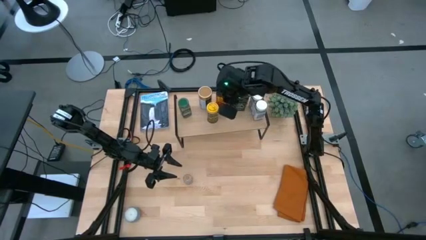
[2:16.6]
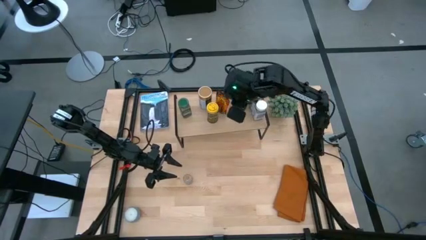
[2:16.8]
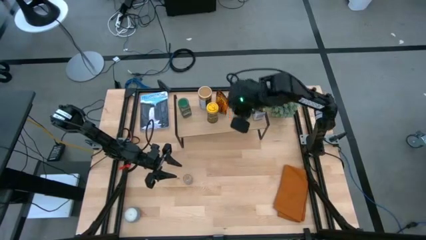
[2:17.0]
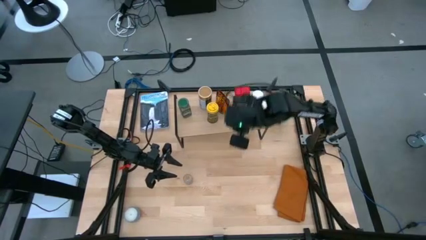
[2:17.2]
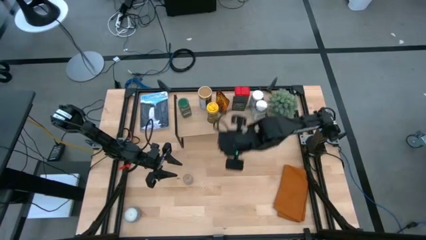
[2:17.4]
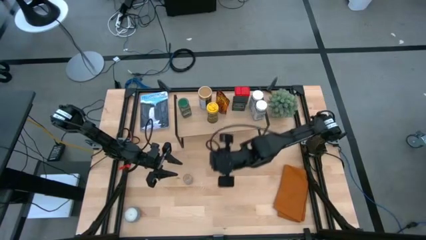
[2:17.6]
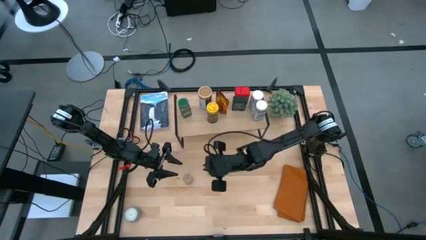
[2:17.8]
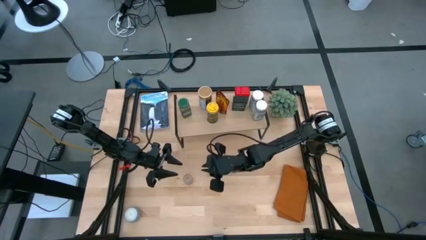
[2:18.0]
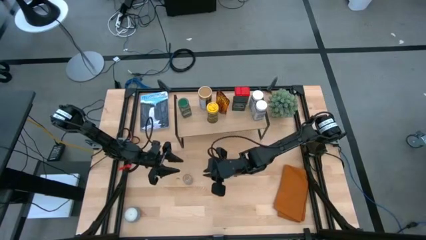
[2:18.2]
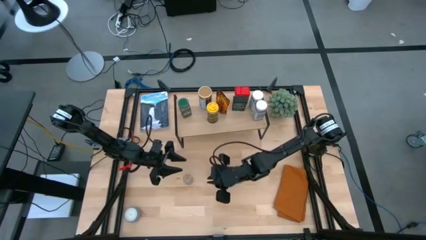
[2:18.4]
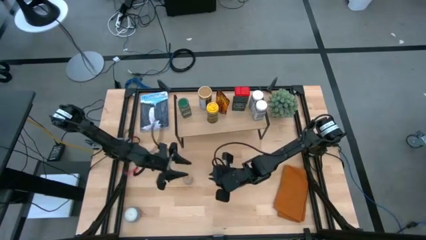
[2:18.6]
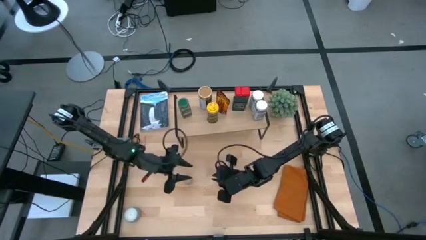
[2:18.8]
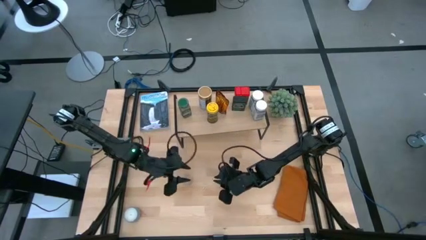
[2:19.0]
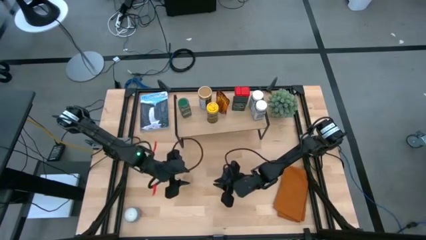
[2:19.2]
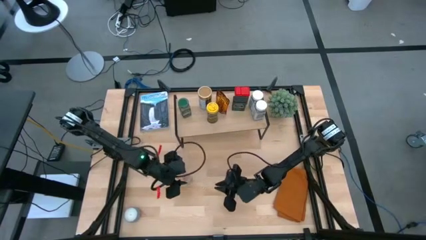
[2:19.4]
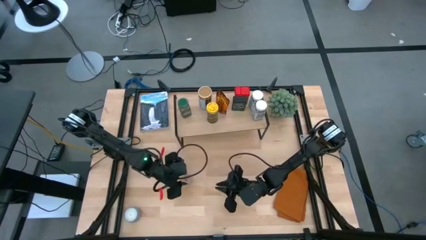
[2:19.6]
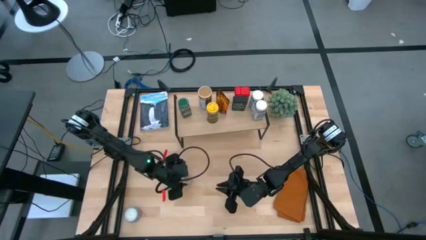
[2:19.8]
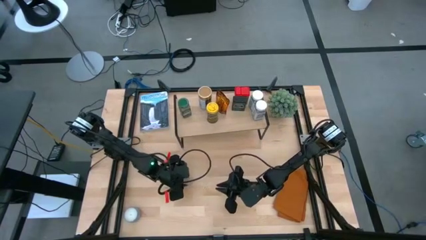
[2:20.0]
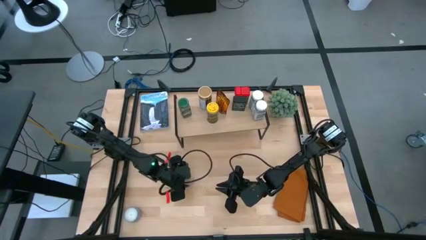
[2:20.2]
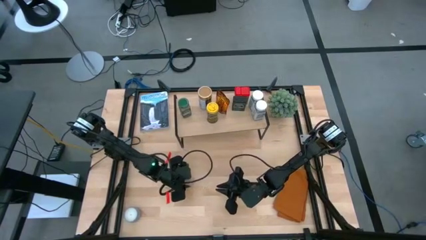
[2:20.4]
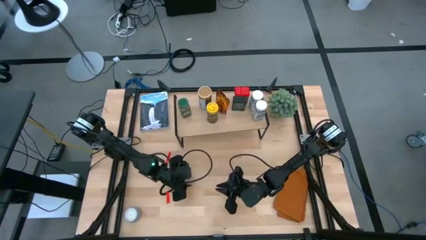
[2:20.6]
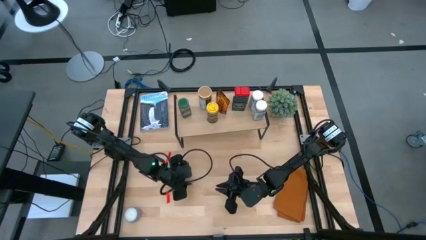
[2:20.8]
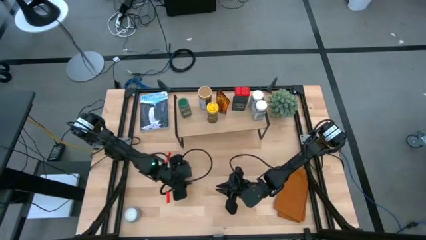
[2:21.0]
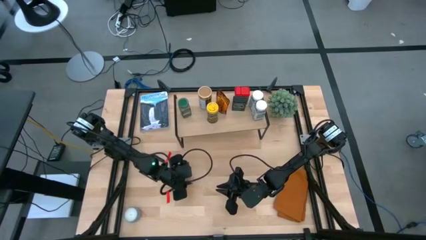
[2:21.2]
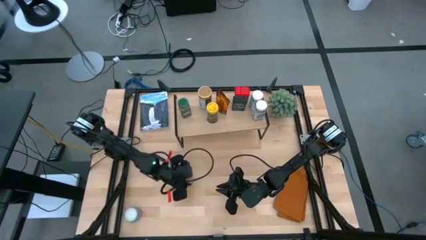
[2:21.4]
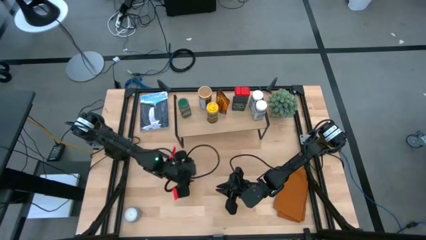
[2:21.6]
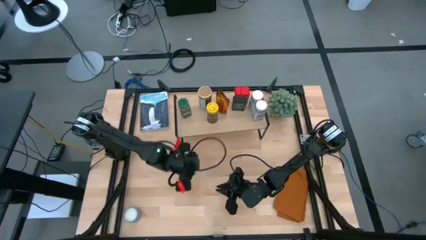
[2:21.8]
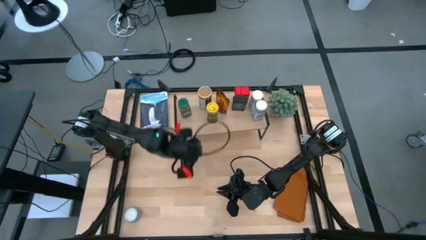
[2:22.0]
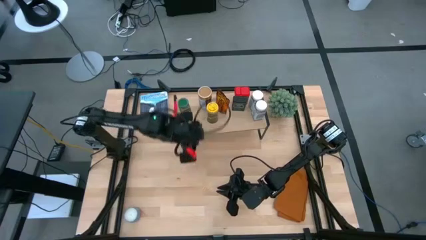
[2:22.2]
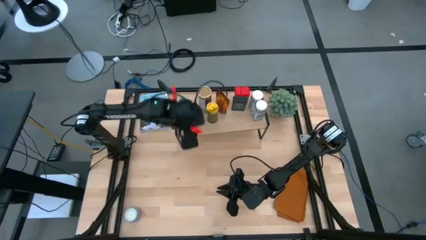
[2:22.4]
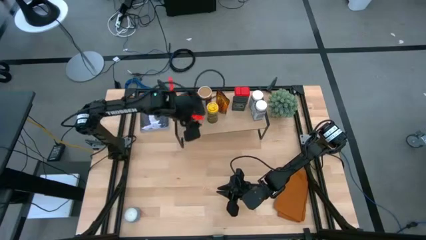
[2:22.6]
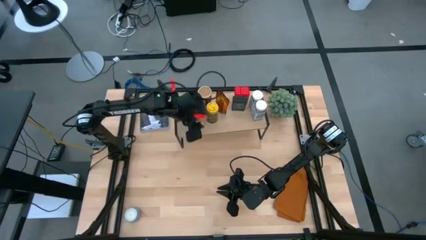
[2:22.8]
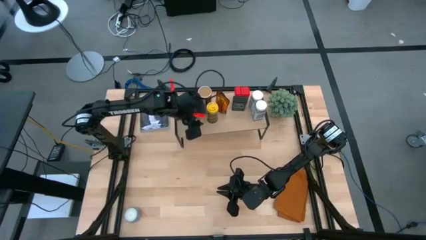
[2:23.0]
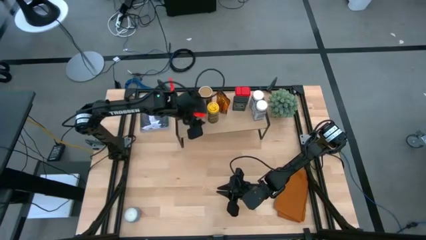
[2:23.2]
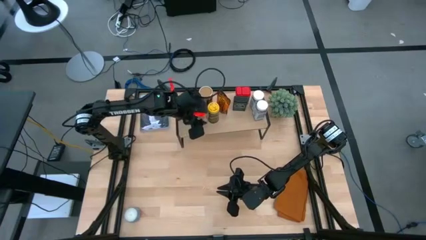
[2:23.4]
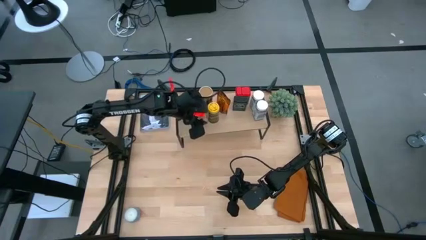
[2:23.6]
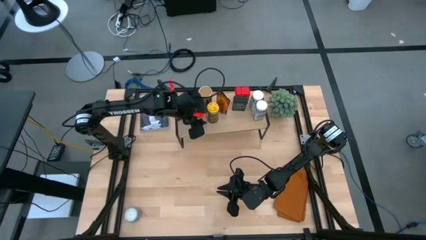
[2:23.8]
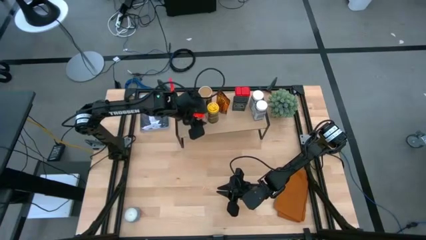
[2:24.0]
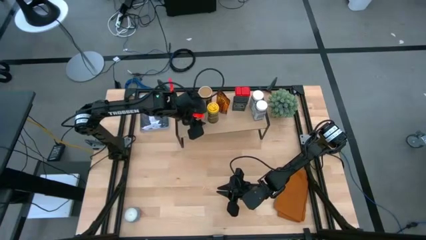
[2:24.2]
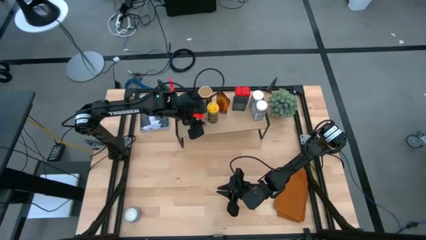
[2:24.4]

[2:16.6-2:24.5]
Task: Shelf spices
Put the transparent seasoning bottle on the shelf aligned with the other yellow seasoning bottle

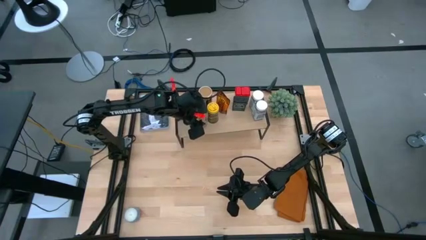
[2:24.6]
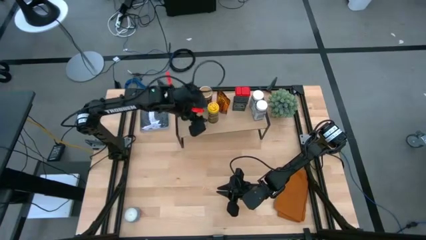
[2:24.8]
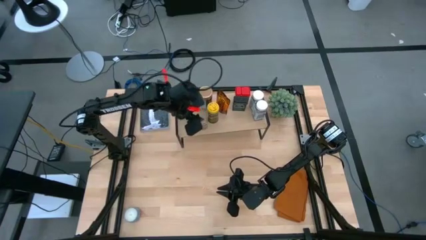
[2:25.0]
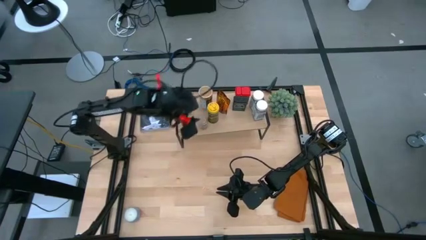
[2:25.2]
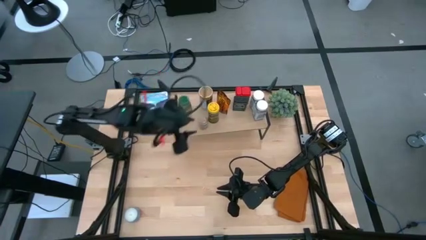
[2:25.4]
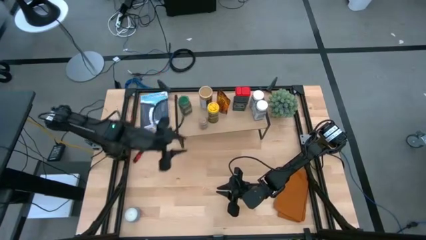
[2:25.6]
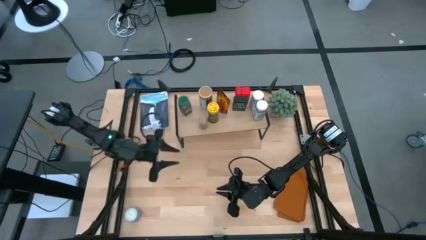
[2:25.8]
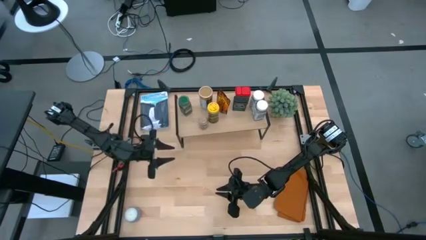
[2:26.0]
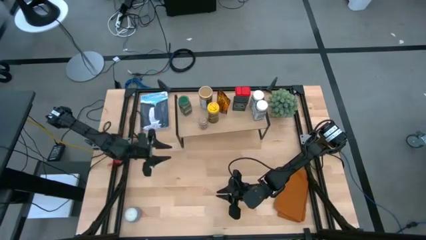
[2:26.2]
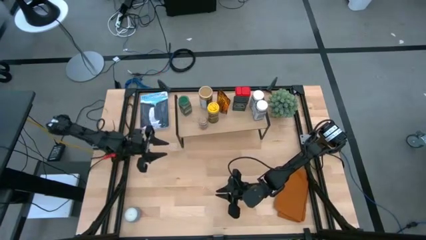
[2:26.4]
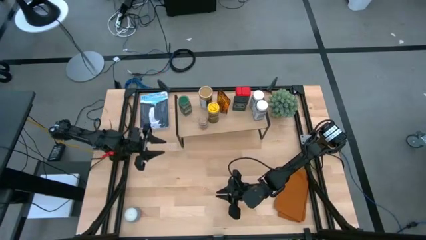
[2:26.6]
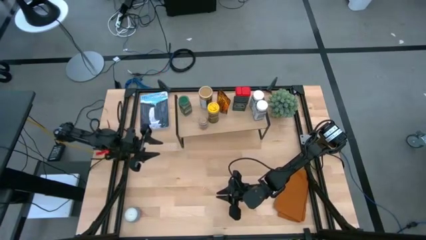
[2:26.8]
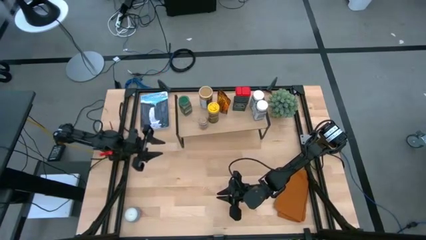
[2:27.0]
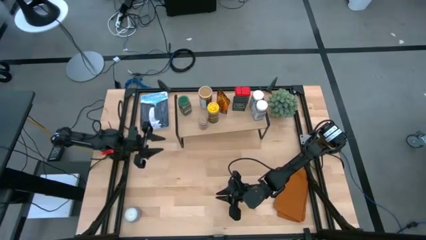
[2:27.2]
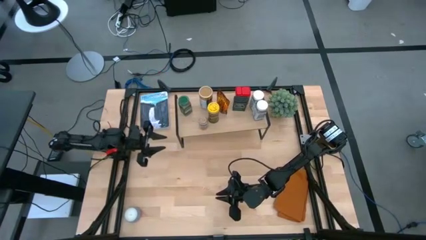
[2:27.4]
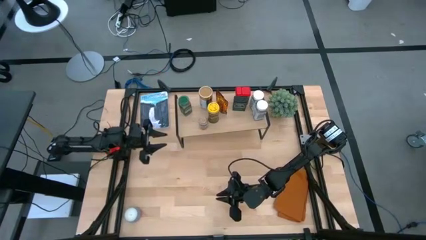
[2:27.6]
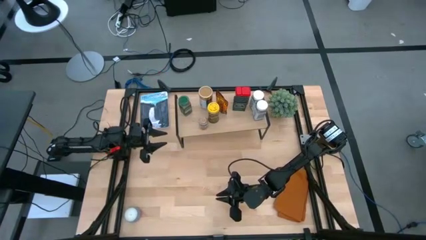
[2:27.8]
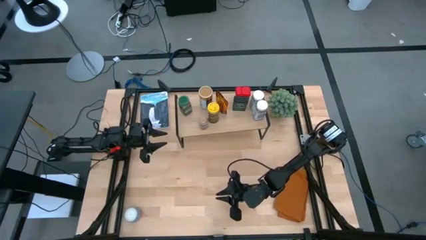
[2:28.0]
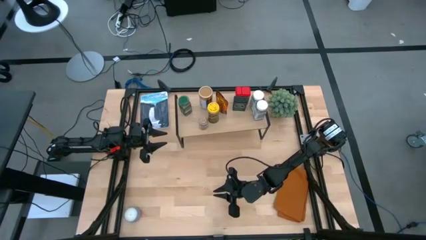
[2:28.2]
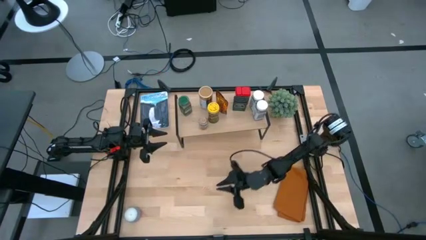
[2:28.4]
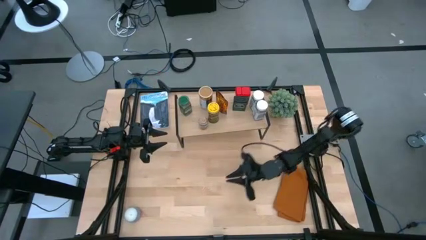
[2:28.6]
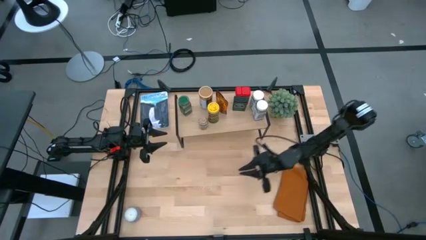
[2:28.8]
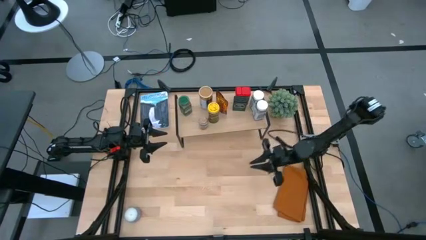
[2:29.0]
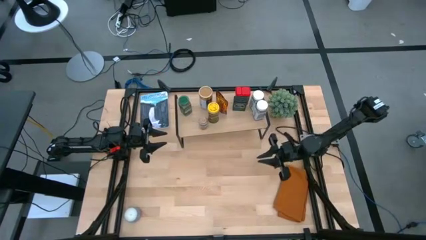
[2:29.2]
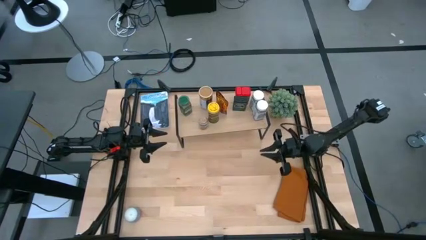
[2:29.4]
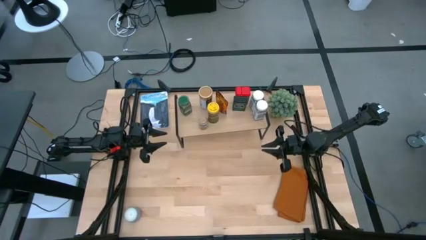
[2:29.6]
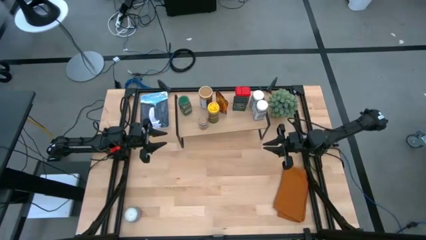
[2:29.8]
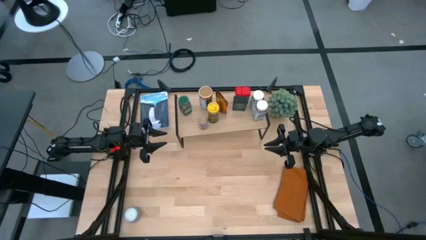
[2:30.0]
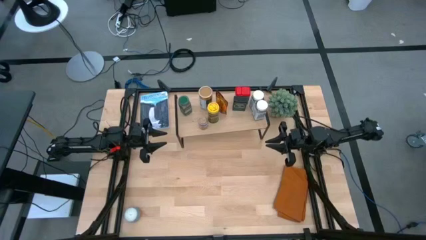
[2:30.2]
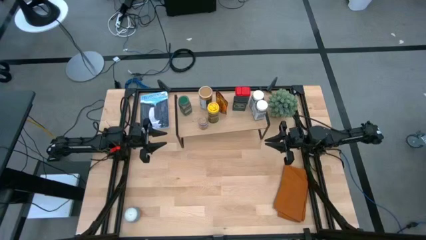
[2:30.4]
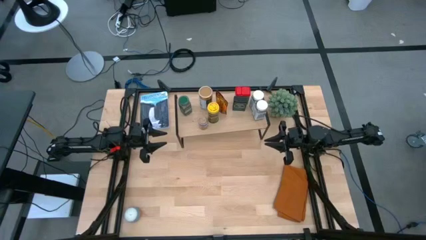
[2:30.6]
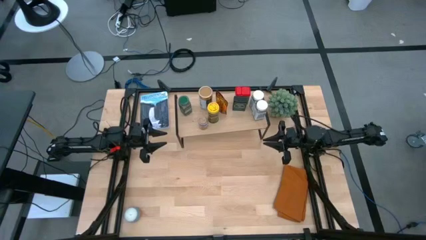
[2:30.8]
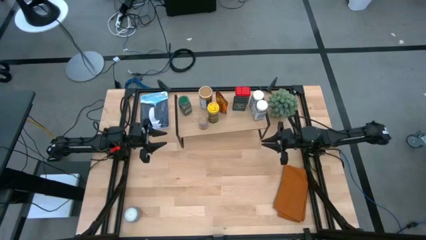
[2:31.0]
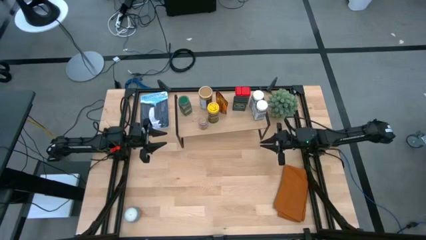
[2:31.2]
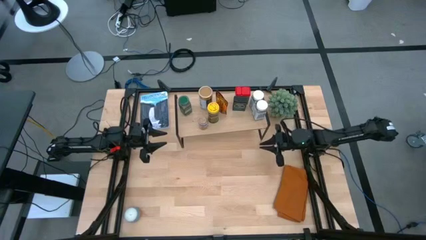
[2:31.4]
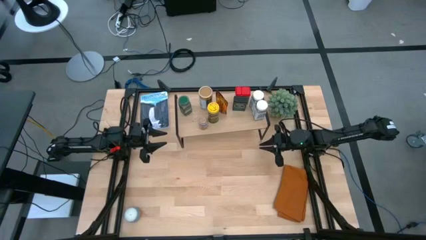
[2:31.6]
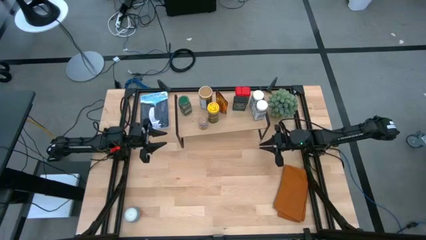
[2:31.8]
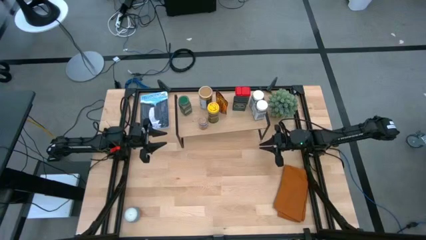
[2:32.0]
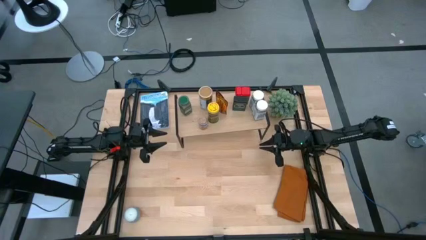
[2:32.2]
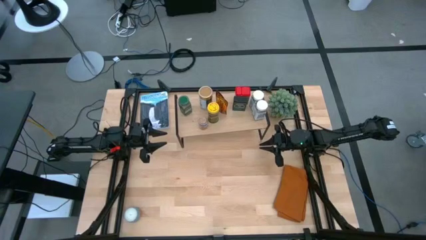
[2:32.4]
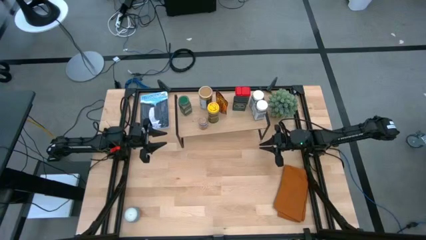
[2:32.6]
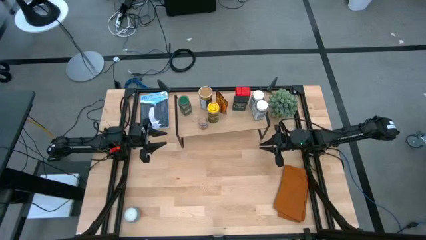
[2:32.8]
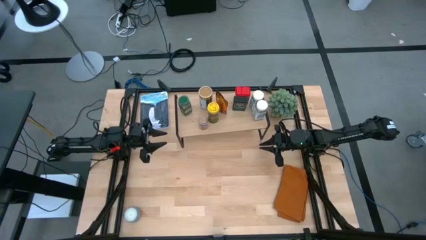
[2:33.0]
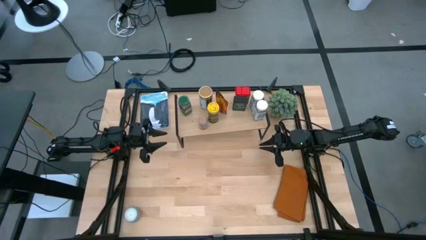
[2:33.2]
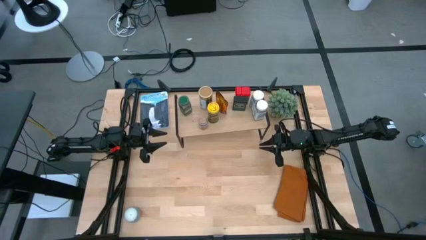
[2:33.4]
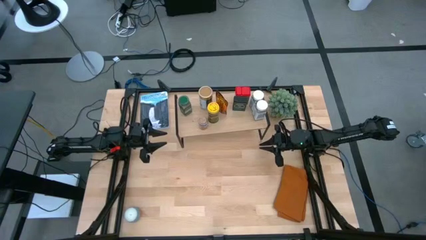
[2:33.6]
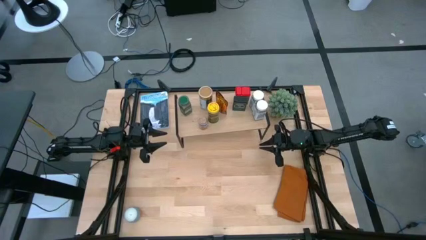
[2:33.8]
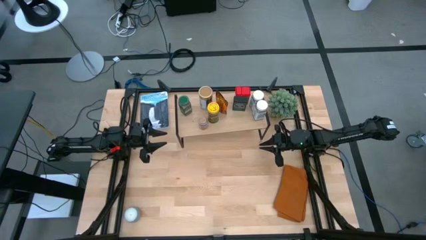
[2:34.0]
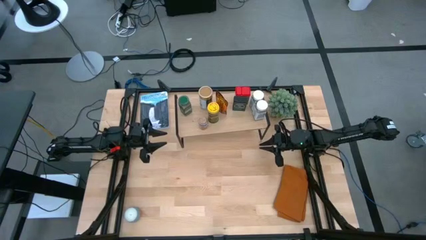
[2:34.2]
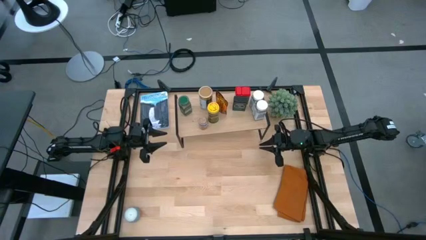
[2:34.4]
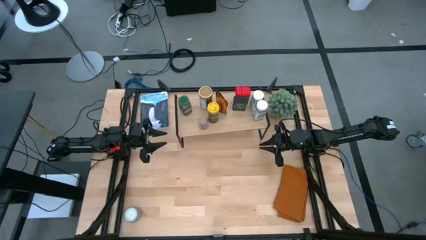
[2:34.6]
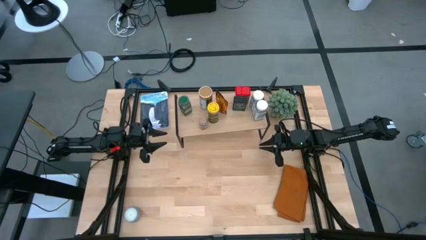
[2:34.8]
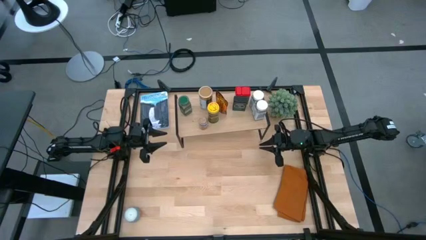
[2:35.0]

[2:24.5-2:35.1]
Return to Home Position
